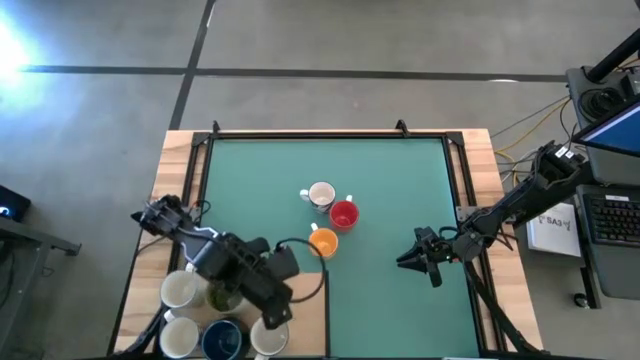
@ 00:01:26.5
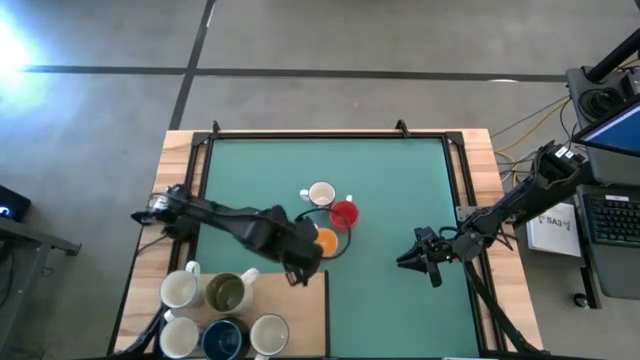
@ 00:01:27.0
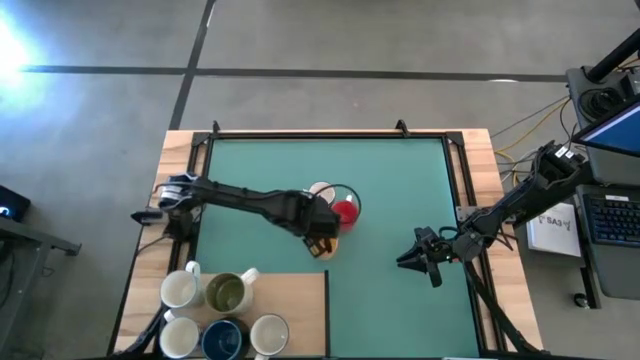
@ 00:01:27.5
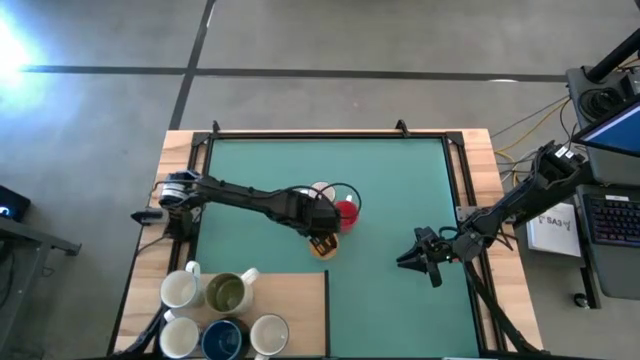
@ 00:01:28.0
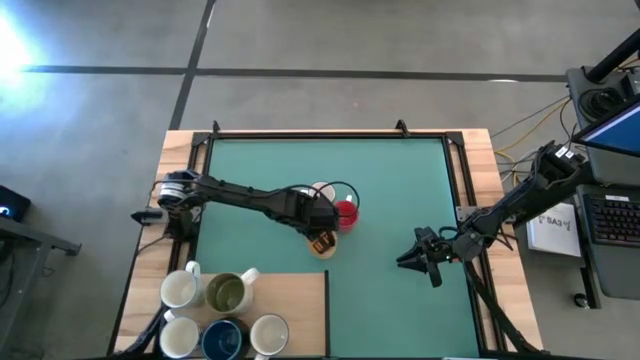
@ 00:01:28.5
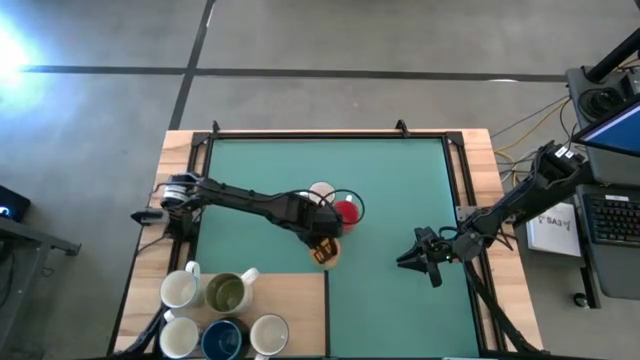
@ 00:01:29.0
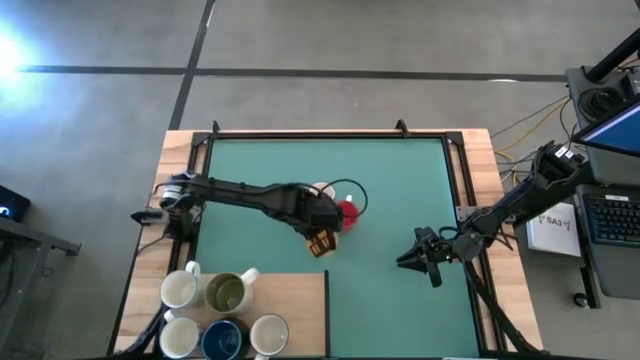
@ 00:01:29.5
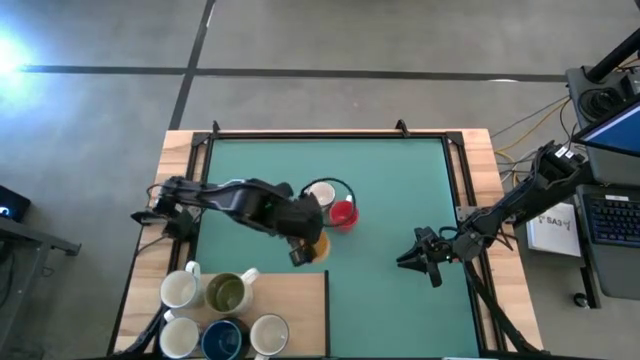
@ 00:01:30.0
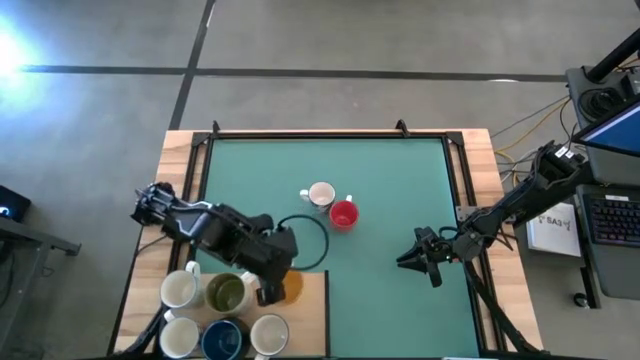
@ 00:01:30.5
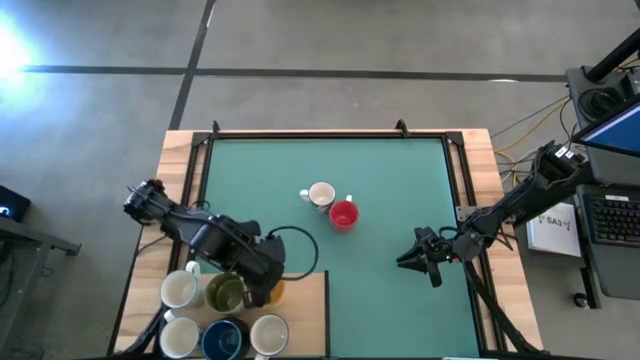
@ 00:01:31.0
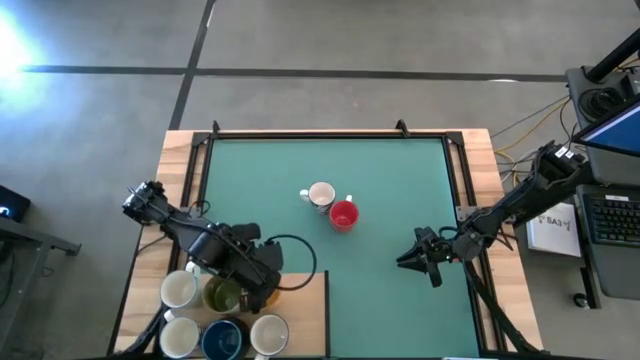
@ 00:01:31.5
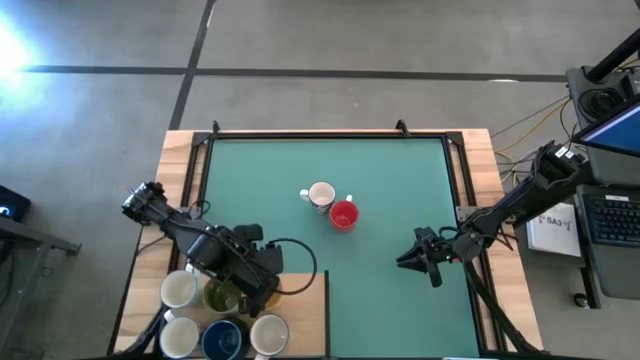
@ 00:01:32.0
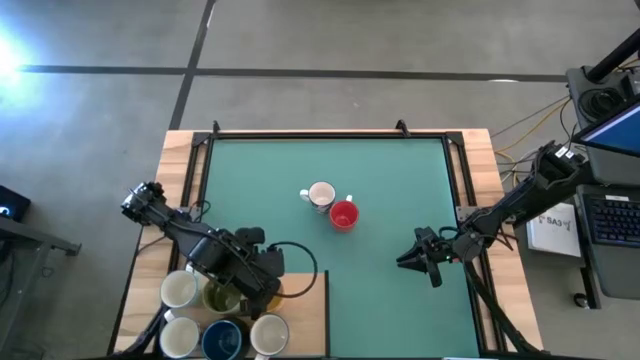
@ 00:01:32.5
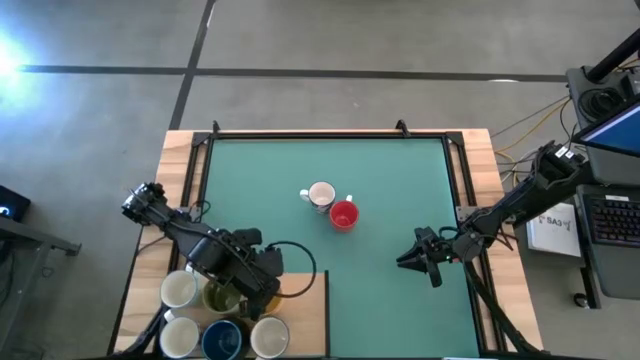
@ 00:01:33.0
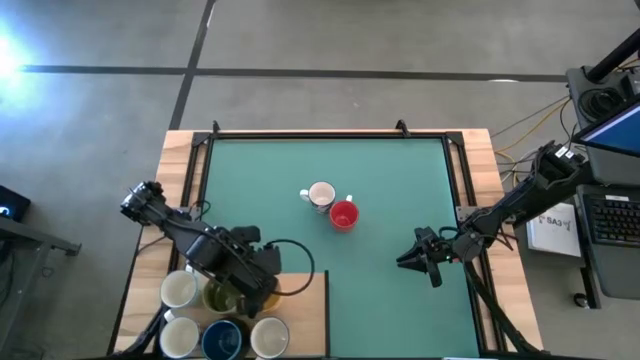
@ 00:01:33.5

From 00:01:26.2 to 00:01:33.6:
Task: Place coffee mugs
Put the yellow mug on the shelf

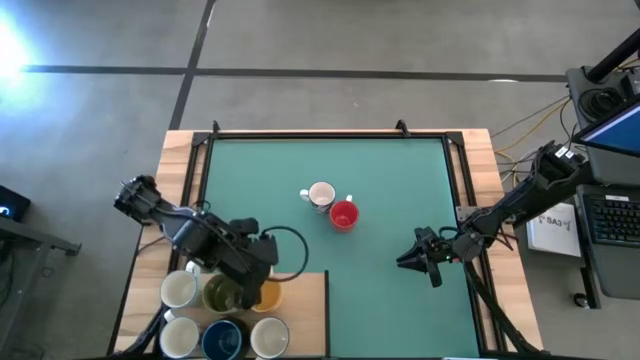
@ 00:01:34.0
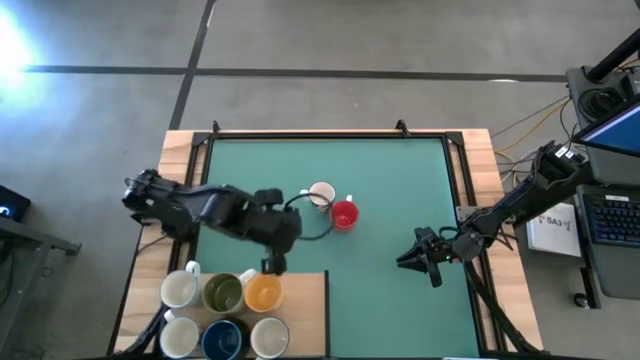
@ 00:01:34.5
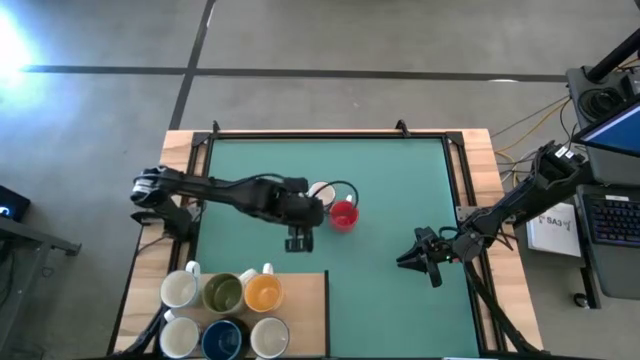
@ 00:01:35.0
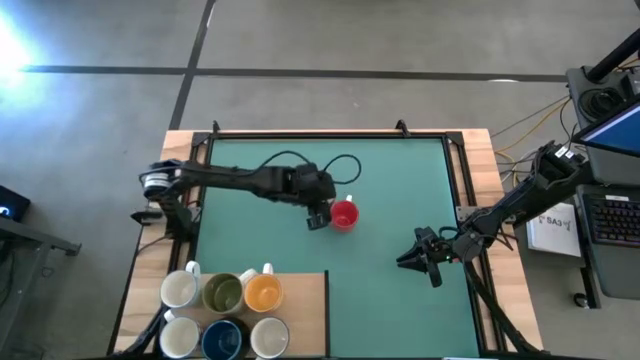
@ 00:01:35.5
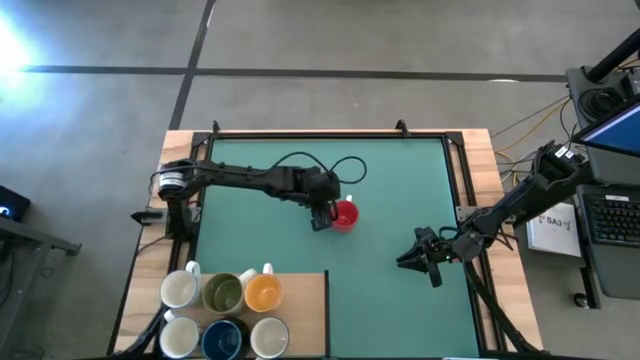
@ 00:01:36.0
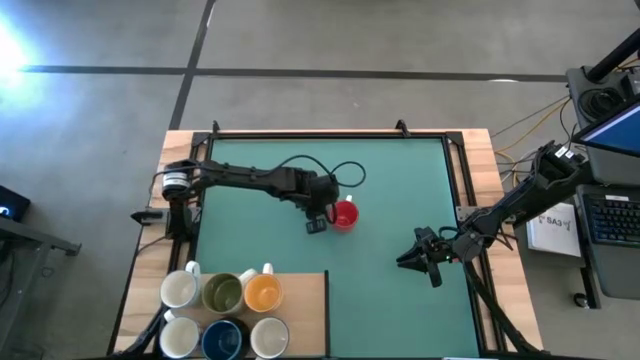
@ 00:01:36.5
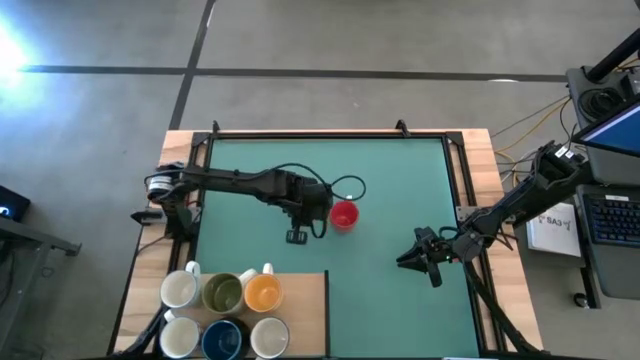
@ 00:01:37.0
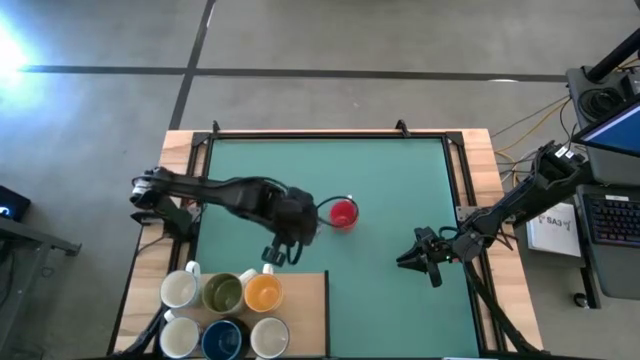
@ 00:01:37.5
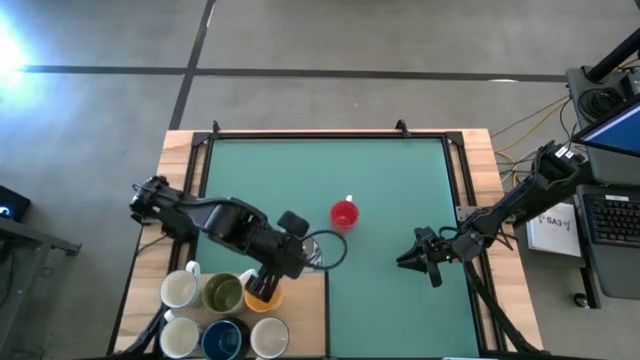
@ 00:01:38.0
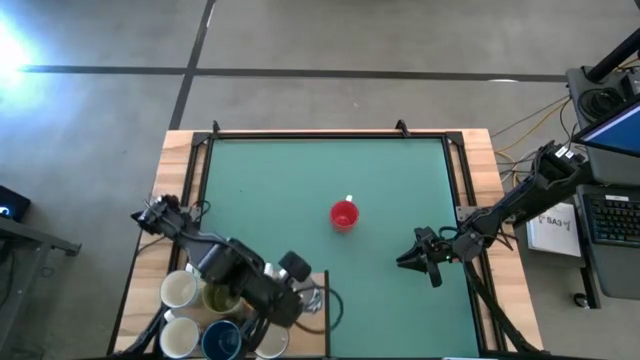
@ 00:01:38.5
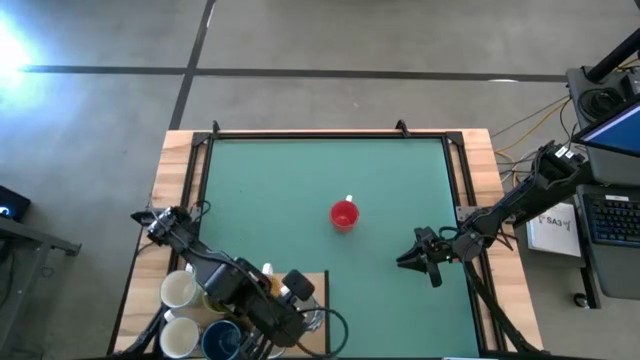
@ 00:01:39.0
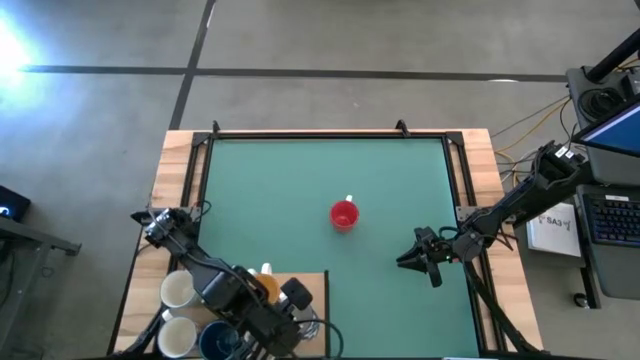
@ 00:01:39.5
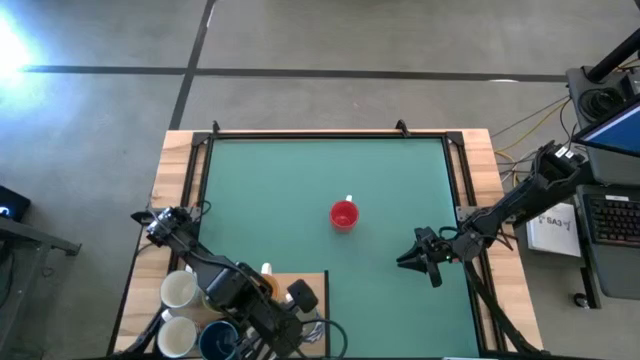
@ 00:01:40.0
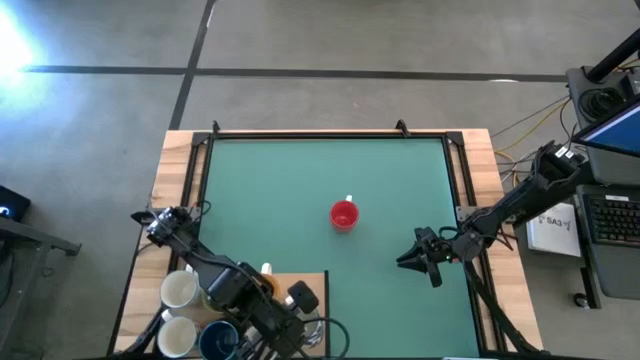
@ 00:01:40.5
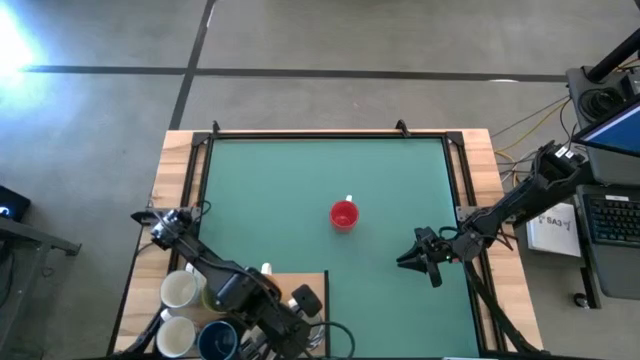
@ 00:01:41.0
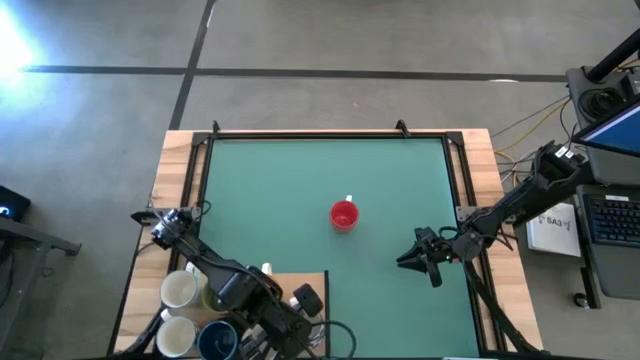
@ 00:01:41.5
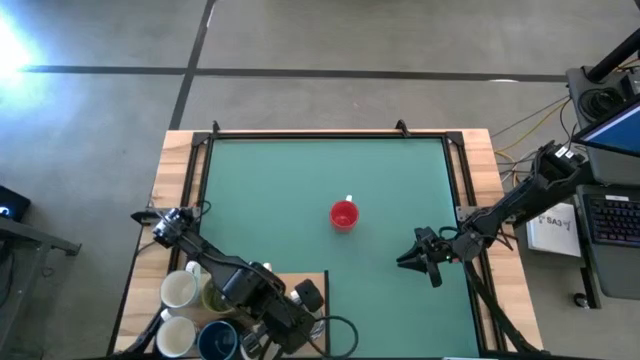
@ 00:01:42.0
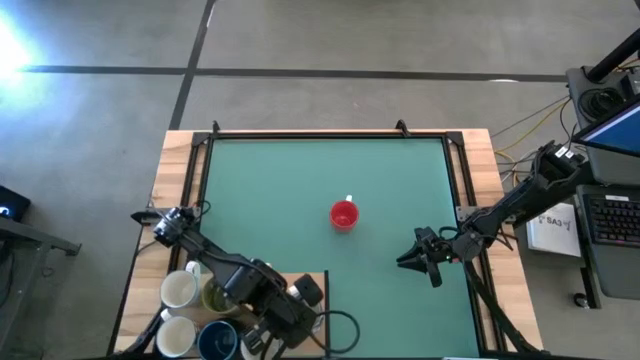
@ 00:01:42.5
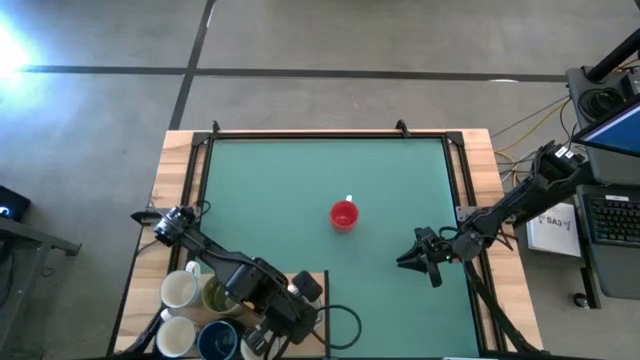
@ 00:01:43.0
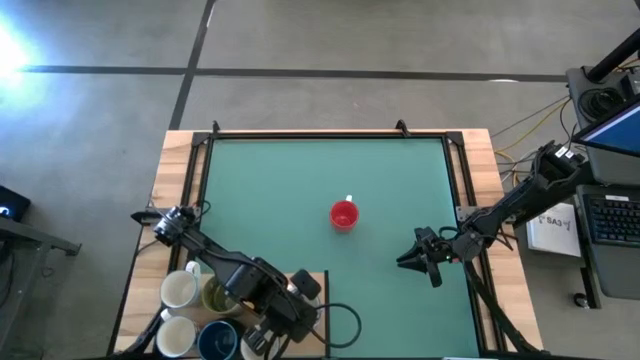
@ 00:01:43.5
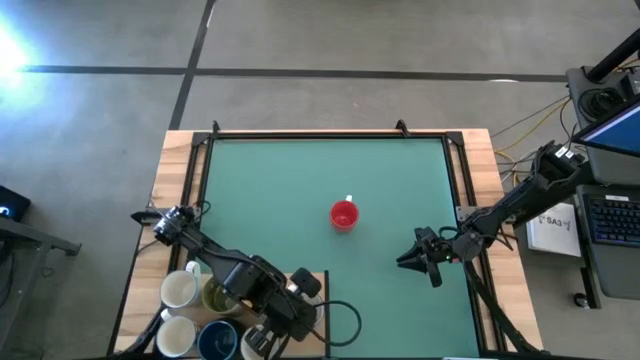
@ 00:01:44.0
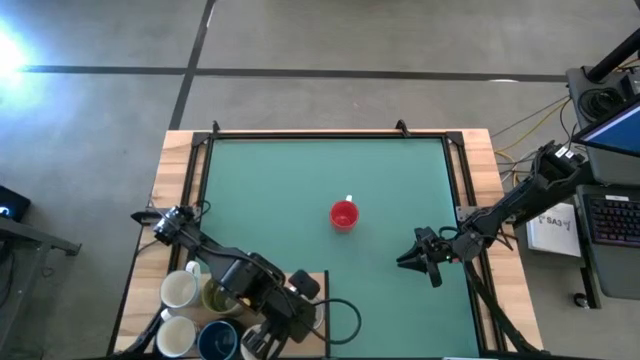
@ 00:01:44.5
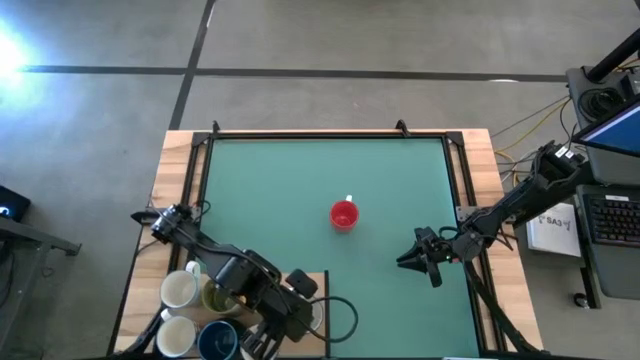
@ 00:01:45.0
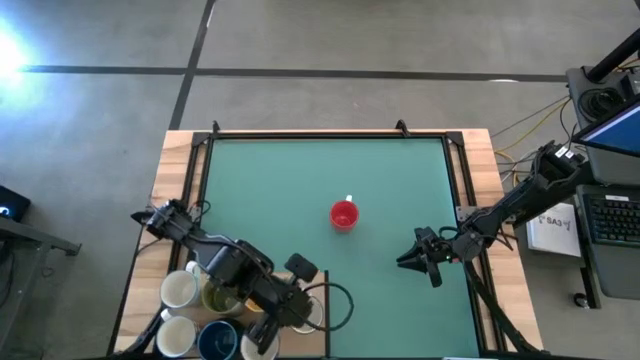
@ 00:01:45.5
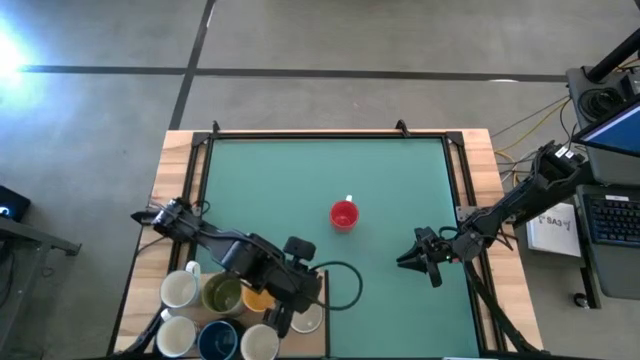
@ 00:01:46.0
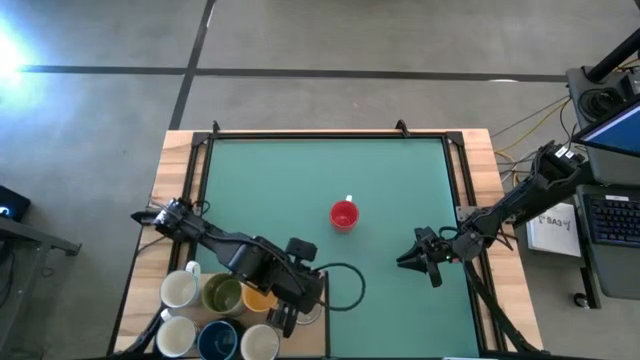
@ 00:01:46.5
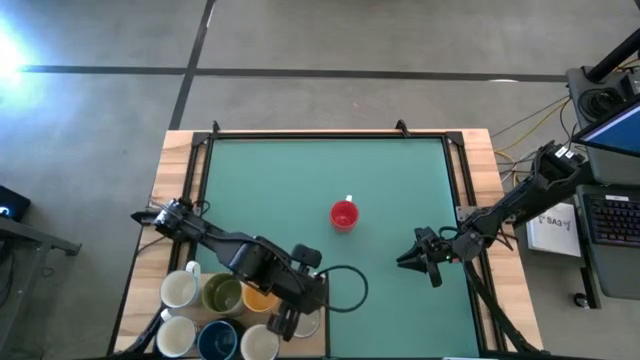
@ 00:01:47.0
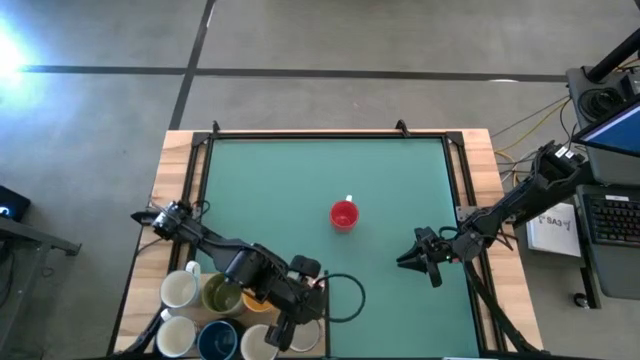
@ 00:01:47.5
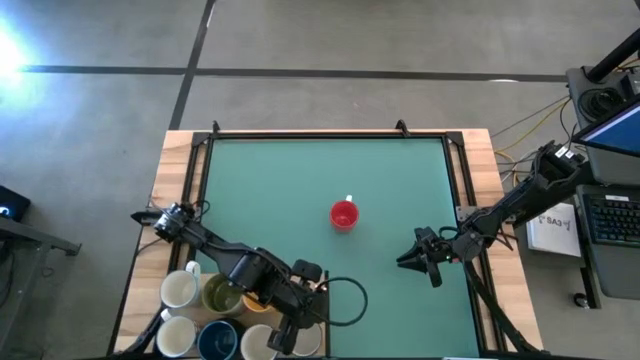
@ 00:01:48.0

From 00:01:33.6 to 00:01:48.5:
Put the blue patterned mug on the shelf
